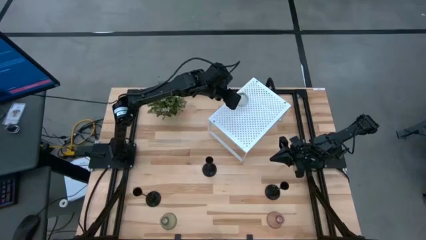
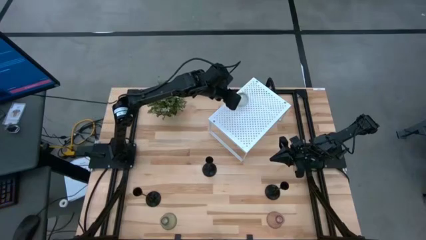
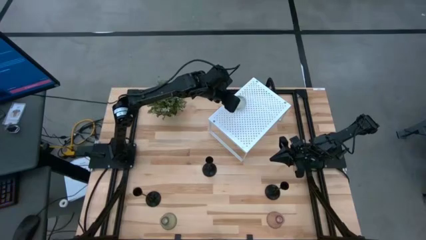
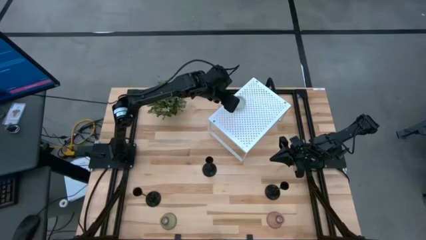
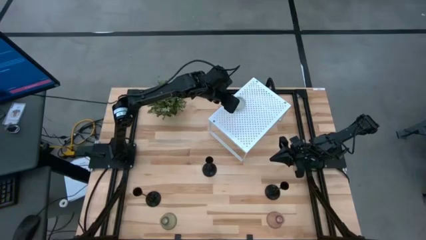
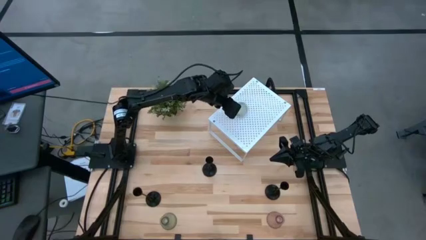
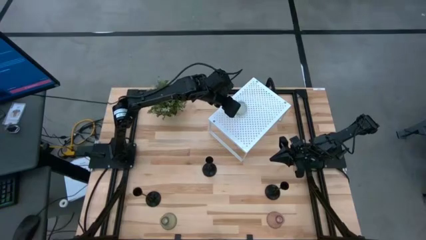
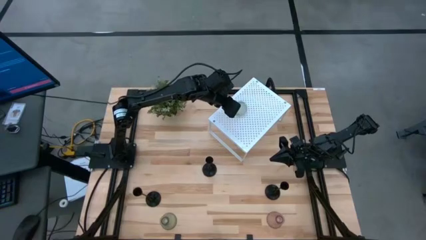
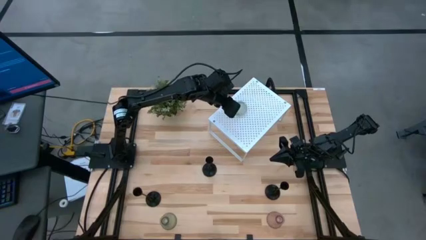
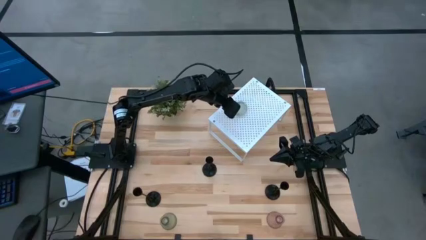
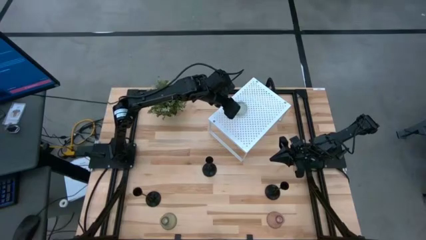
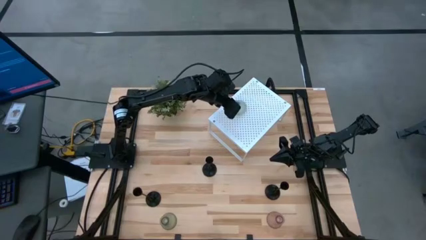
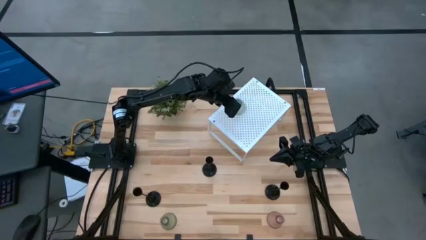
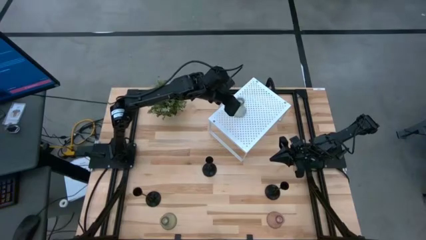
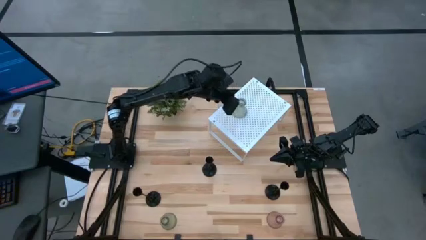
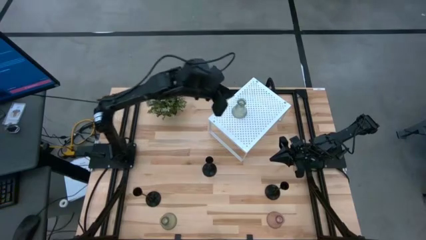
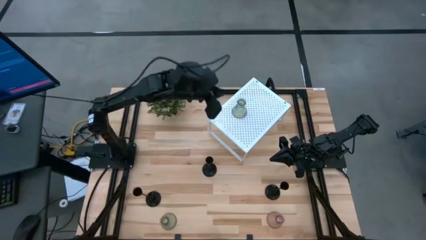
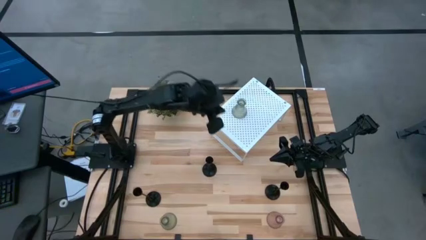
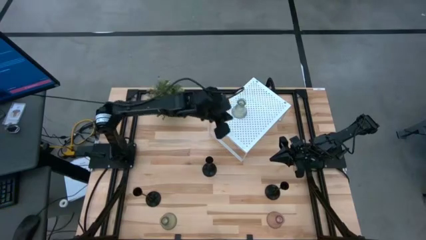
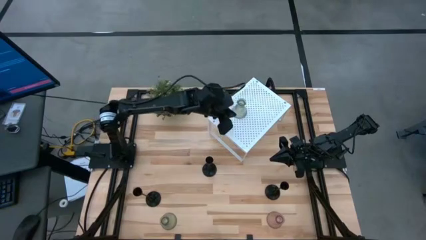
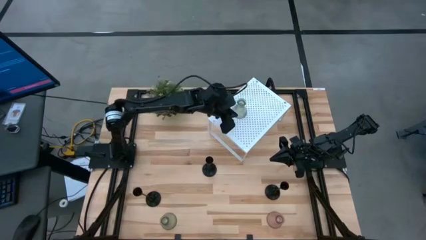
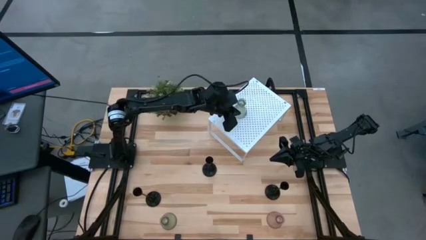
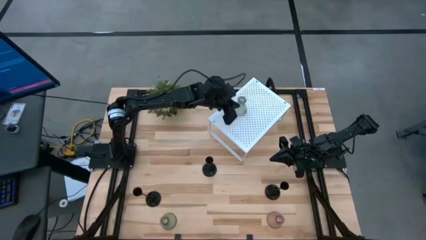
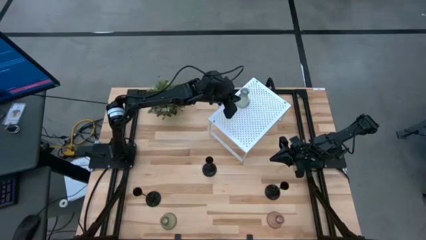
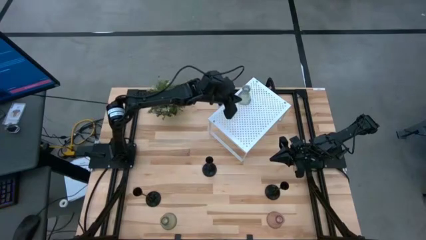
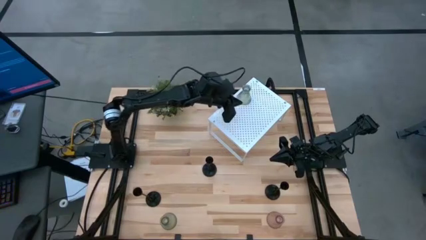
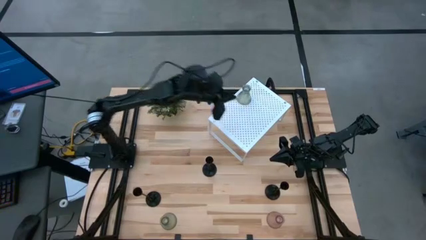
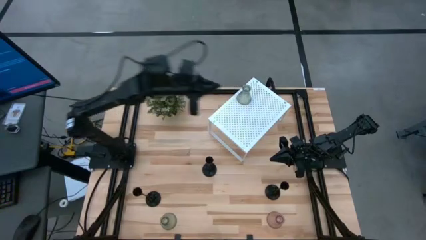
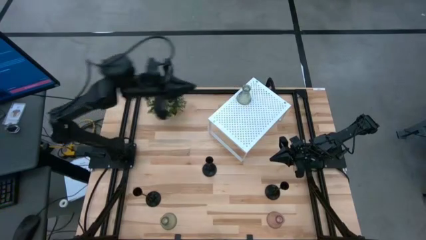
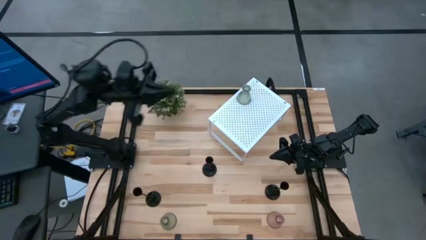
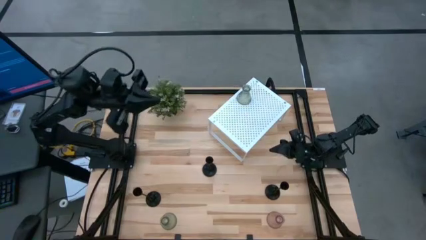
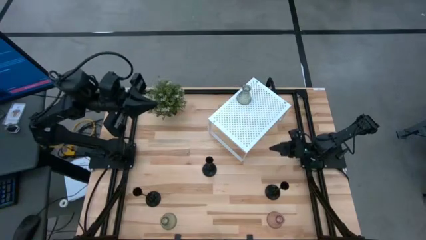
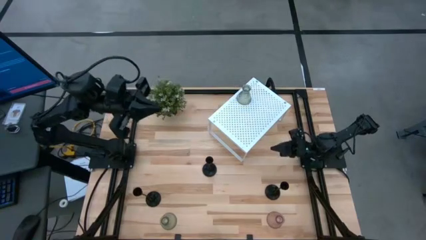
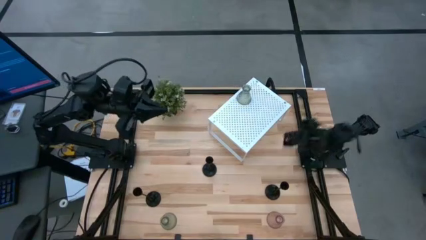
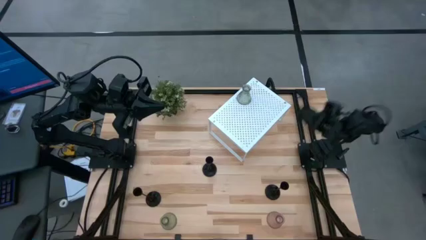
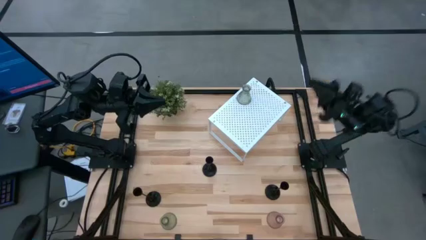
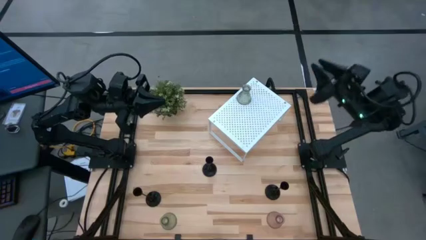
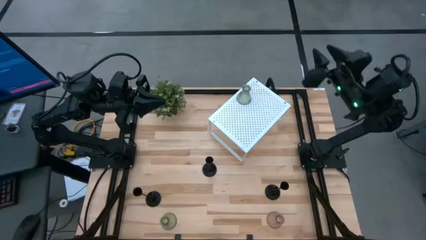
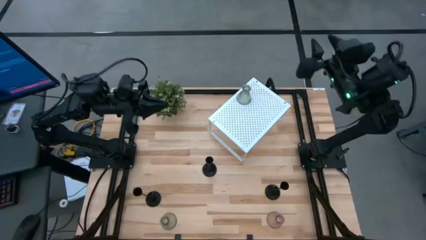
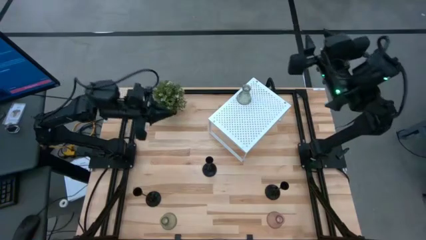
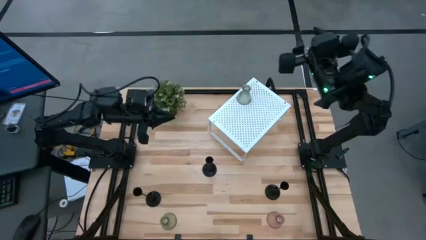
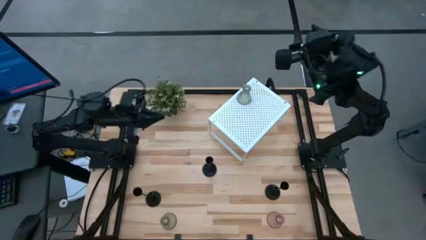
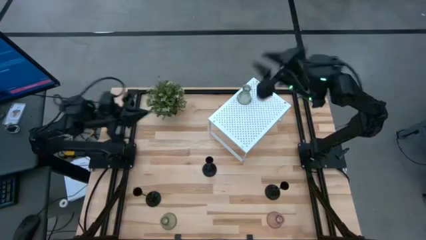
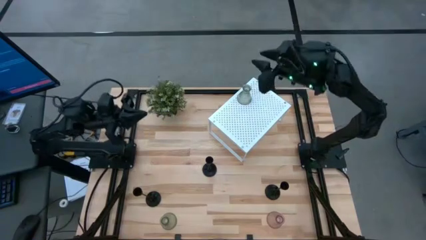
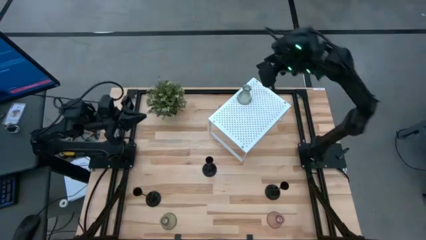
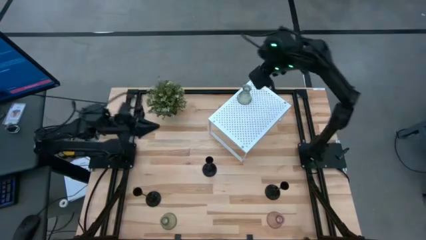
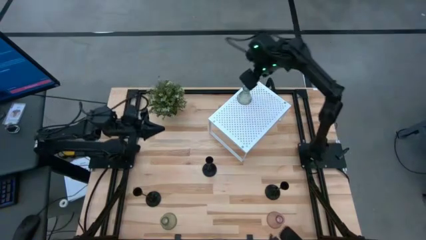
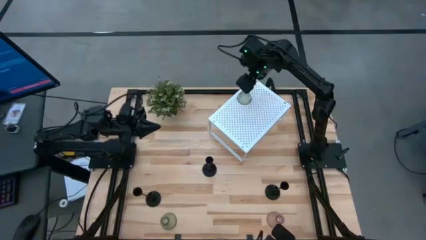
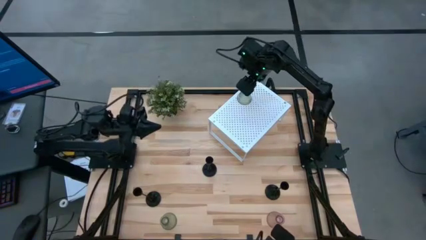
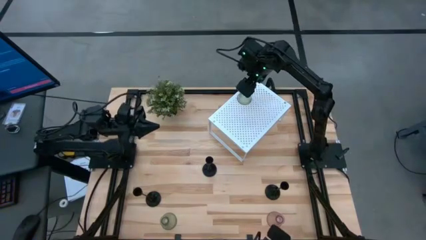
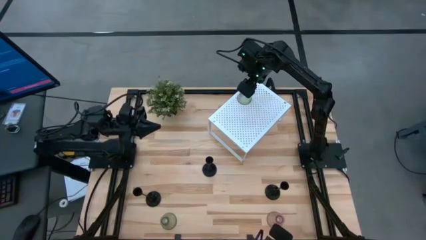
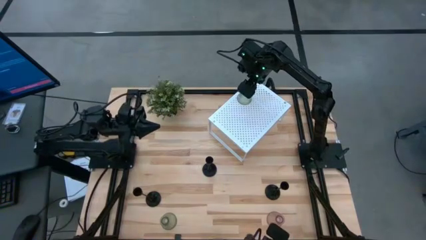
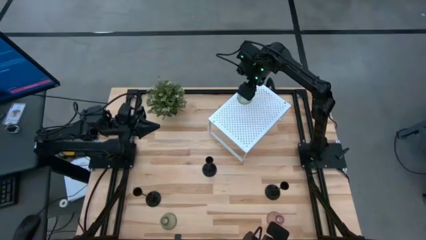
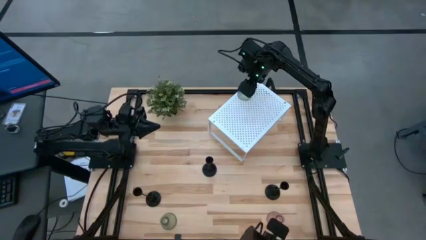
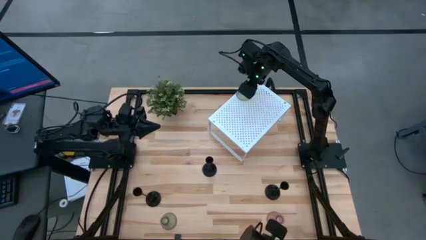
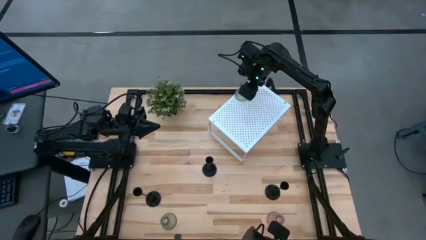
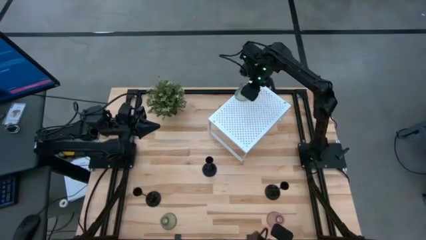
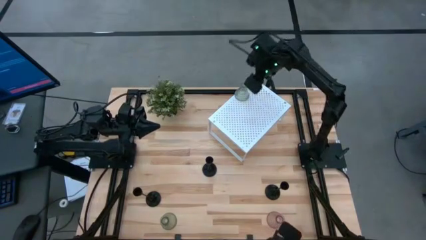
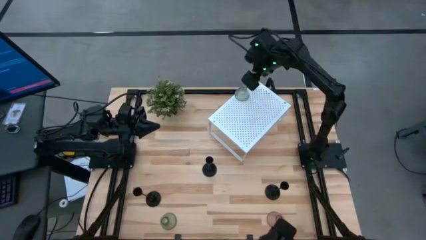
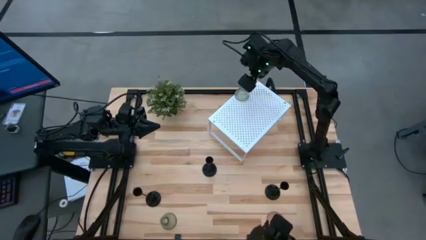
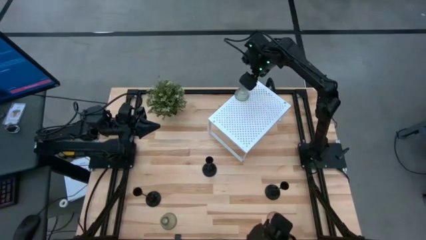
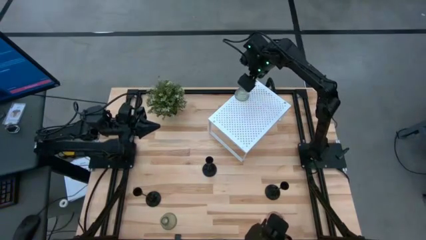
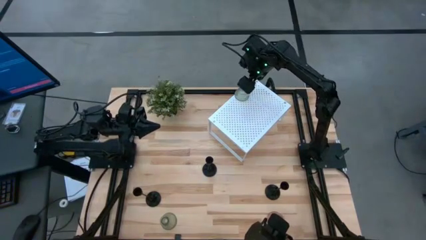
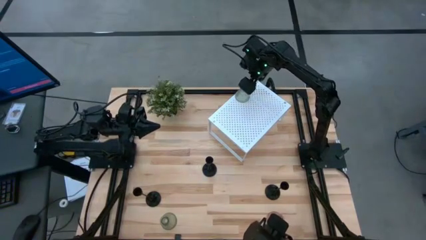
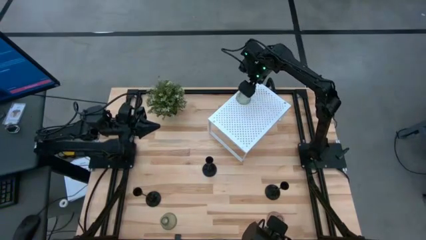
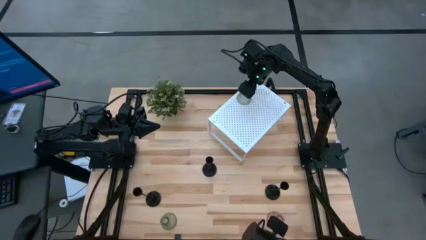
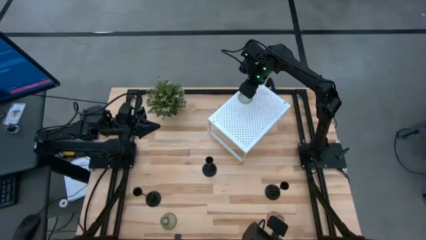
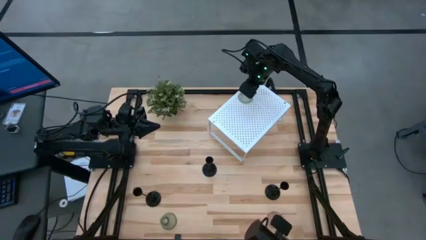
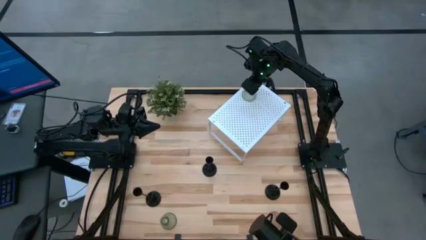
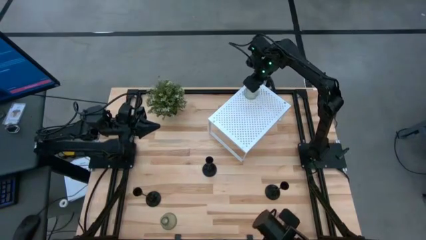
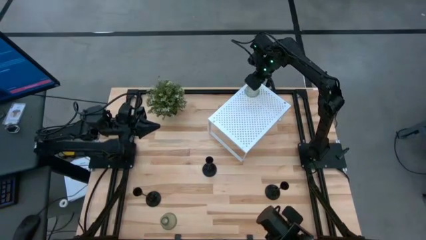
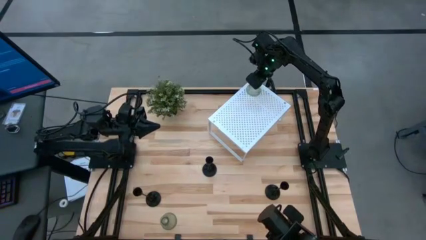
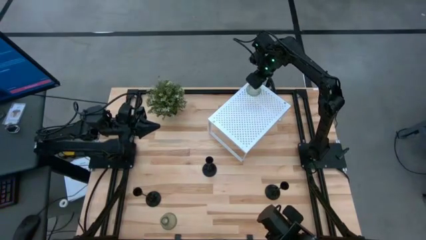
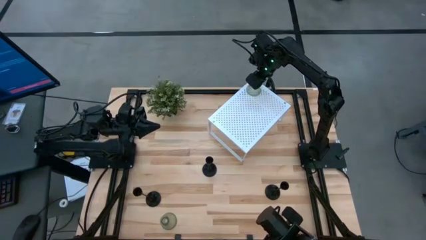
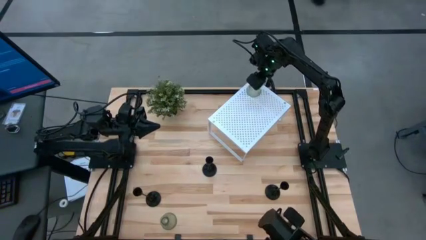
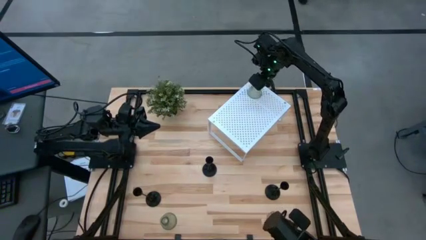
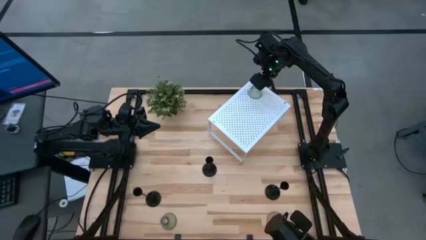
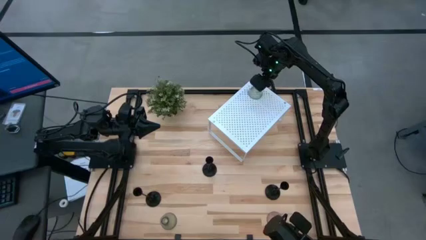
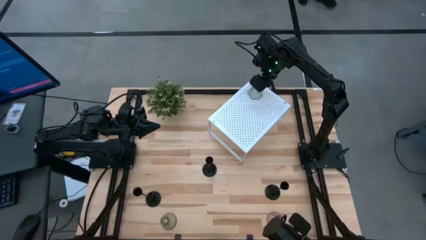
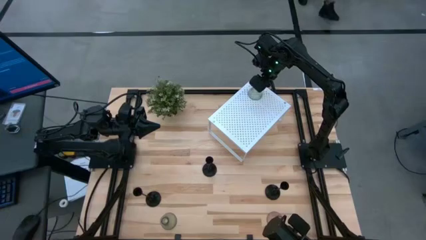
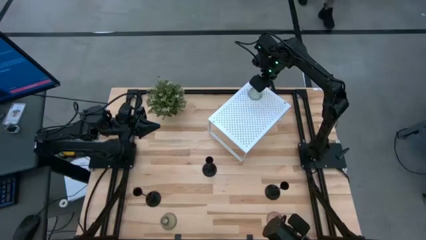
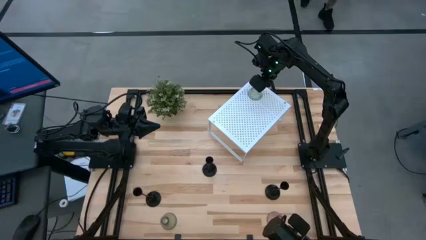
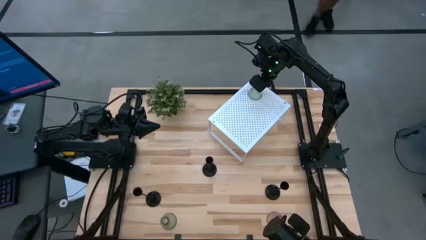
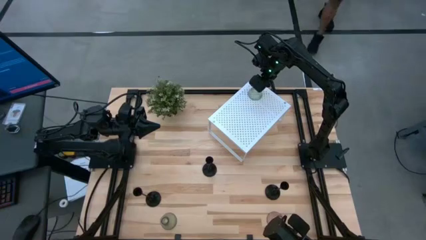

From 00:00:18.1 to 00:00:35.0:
Task: Pick & Place candle stick holders
Put the top green glass candle holder on the shelf
